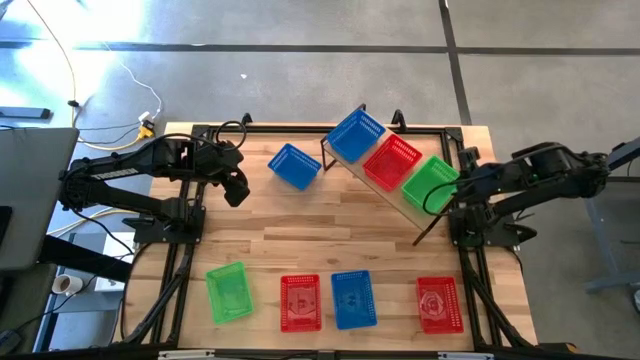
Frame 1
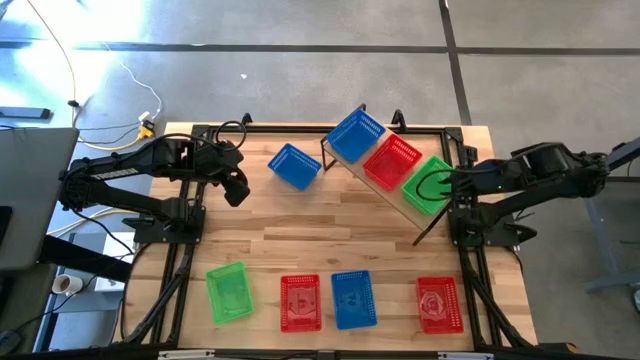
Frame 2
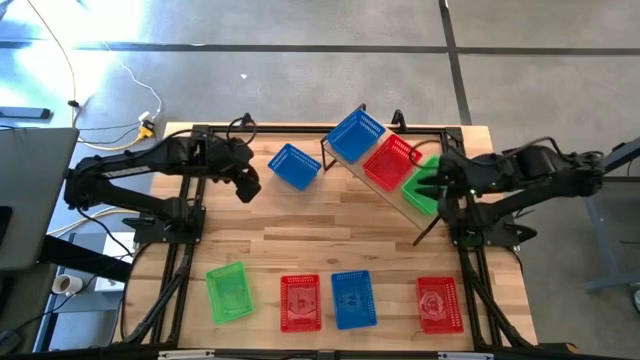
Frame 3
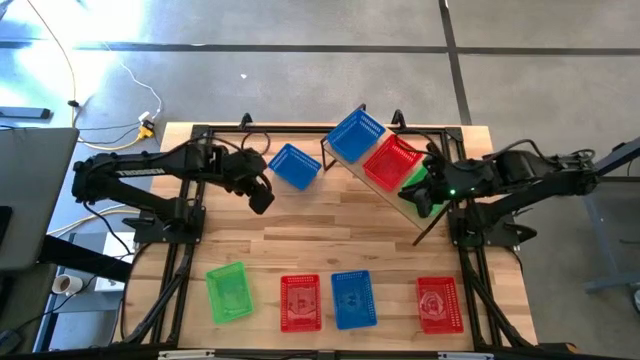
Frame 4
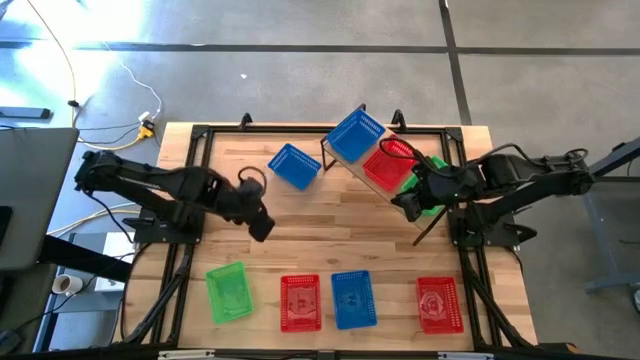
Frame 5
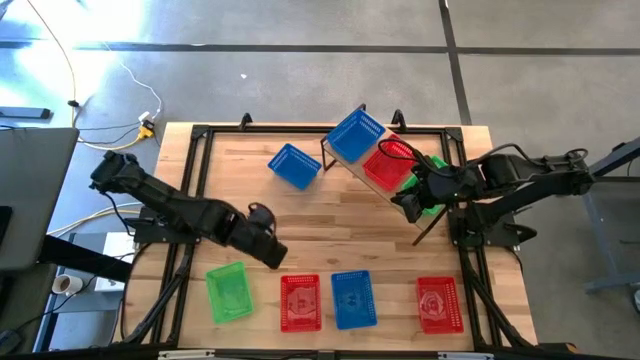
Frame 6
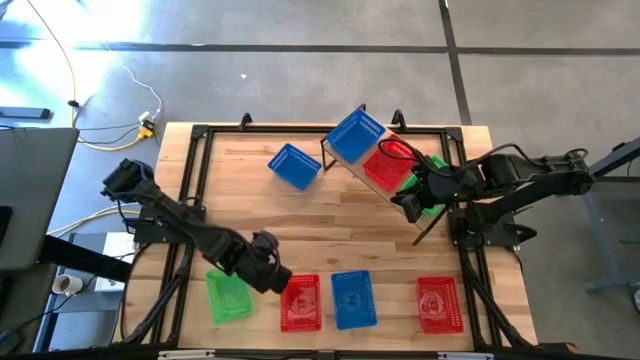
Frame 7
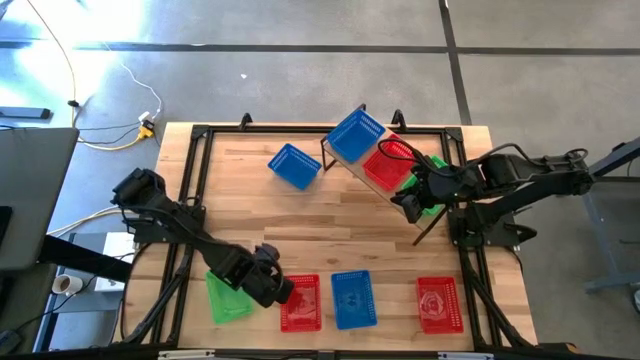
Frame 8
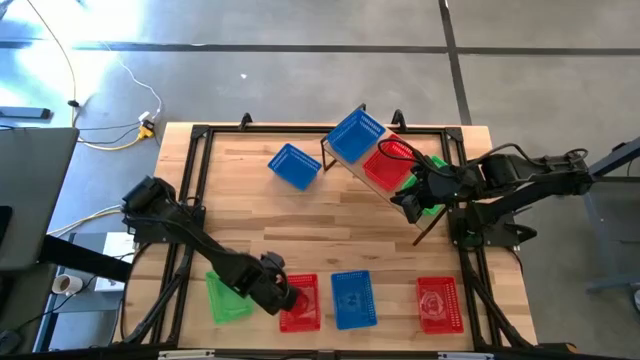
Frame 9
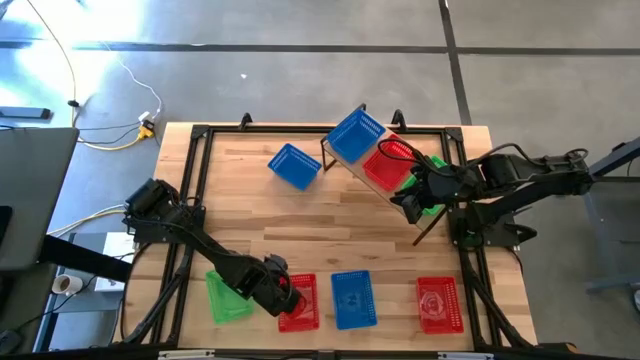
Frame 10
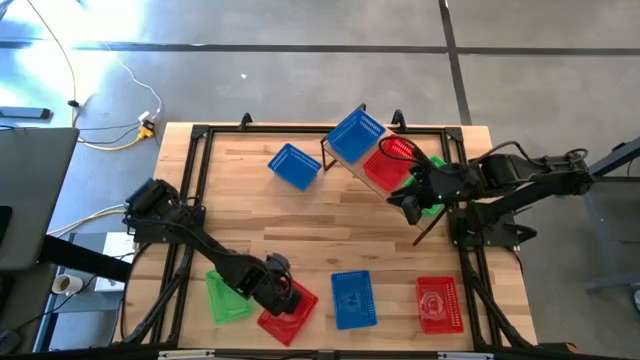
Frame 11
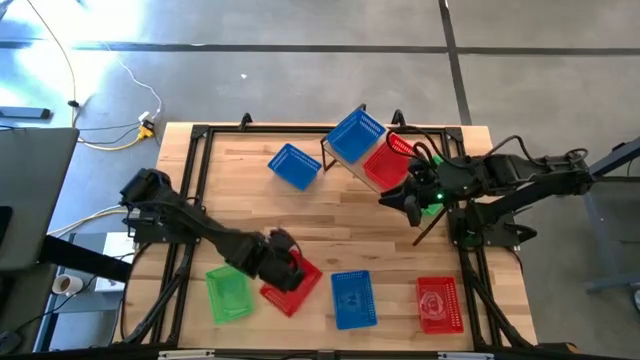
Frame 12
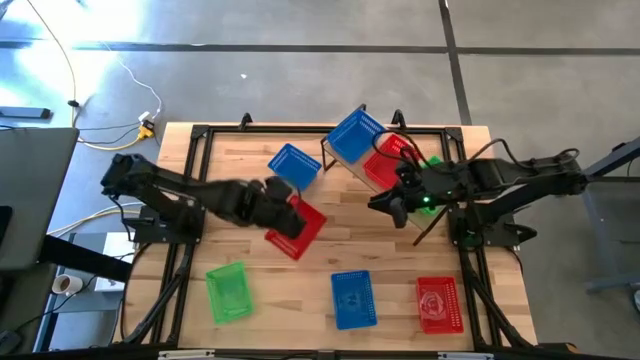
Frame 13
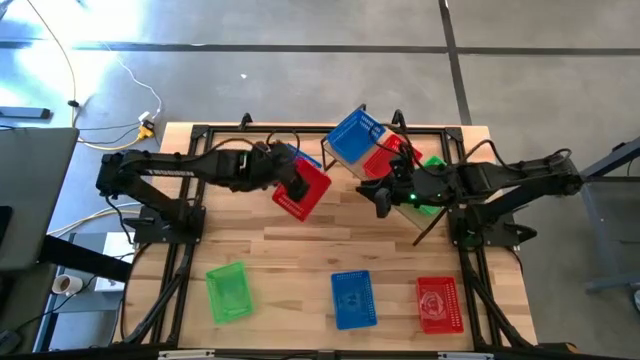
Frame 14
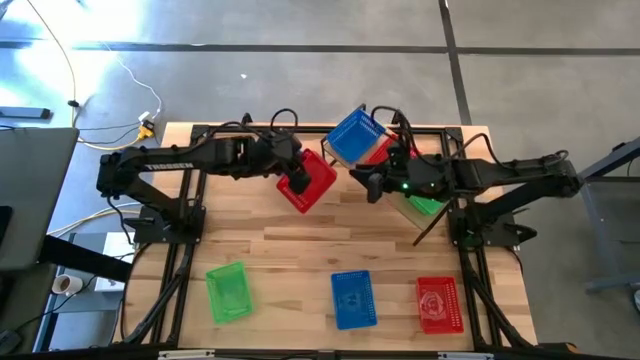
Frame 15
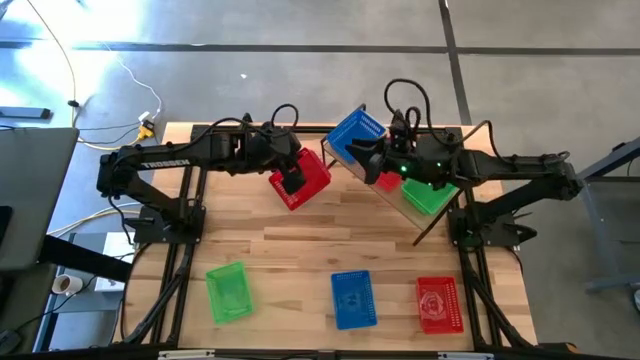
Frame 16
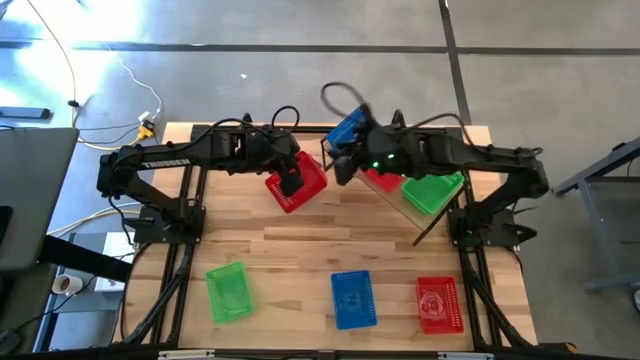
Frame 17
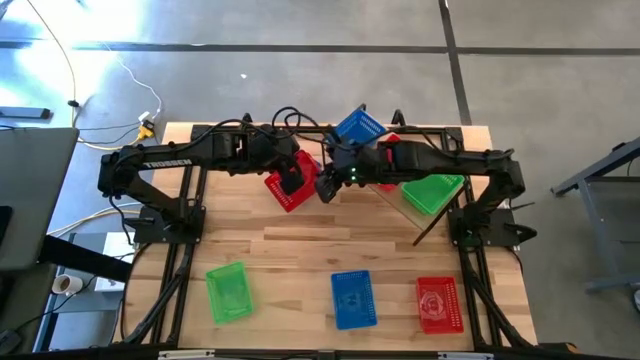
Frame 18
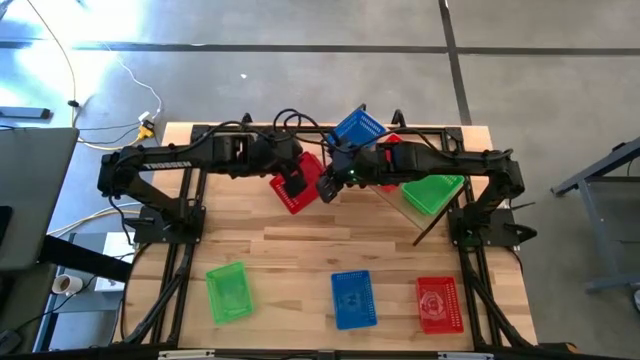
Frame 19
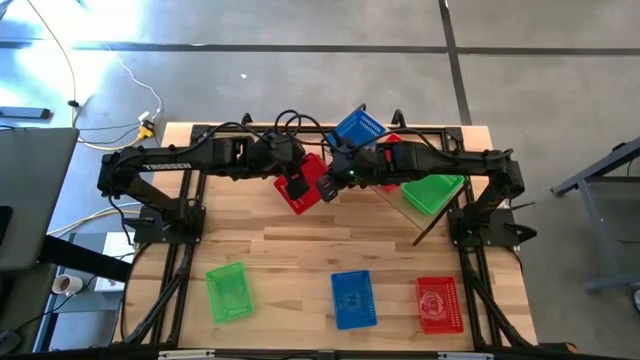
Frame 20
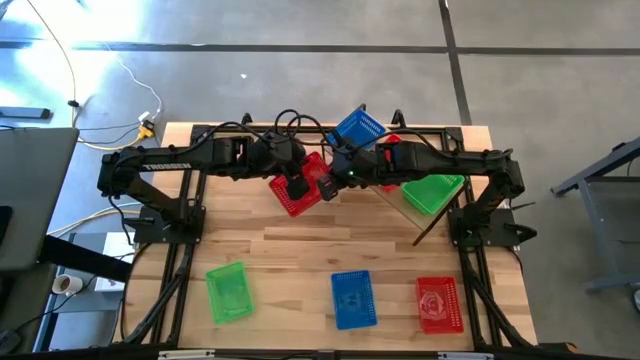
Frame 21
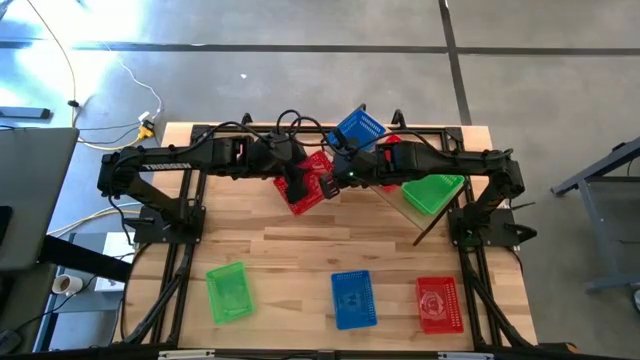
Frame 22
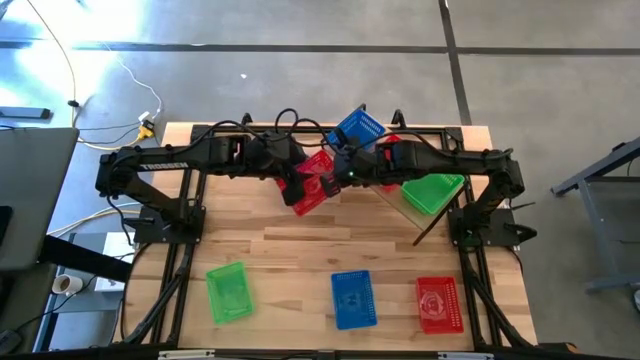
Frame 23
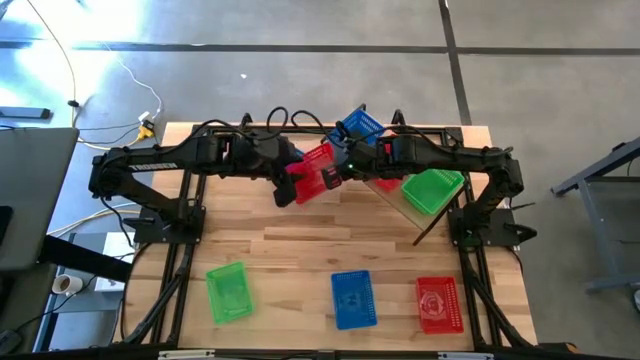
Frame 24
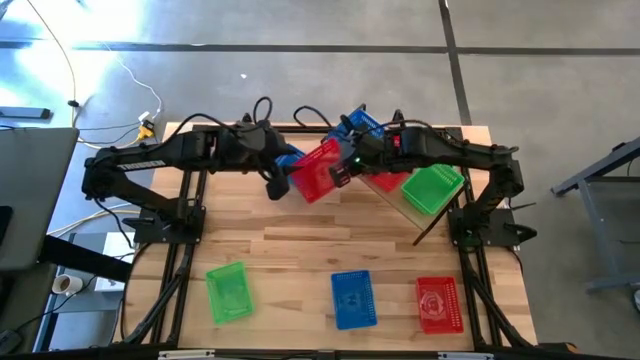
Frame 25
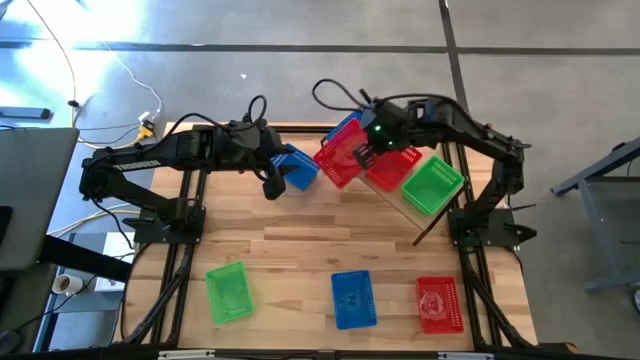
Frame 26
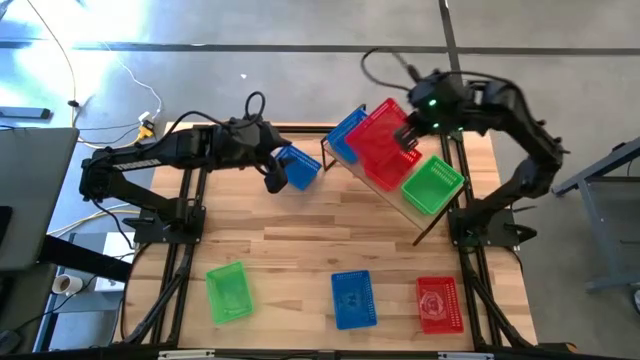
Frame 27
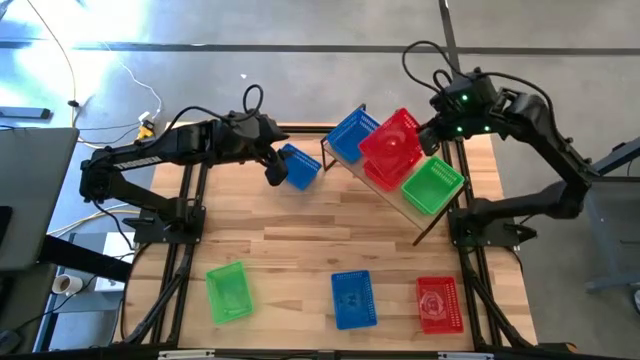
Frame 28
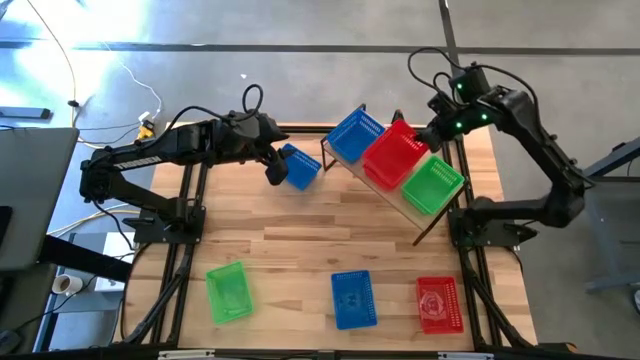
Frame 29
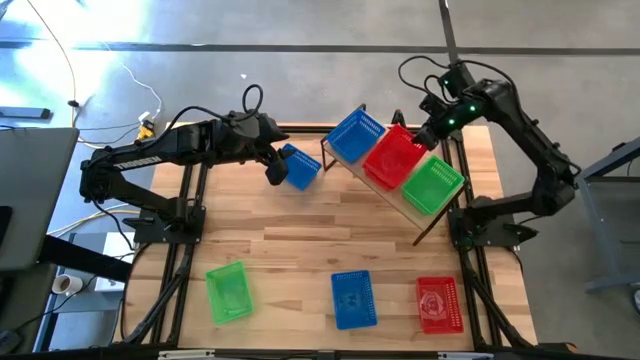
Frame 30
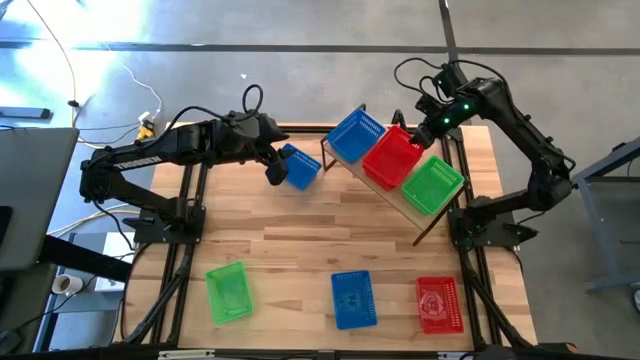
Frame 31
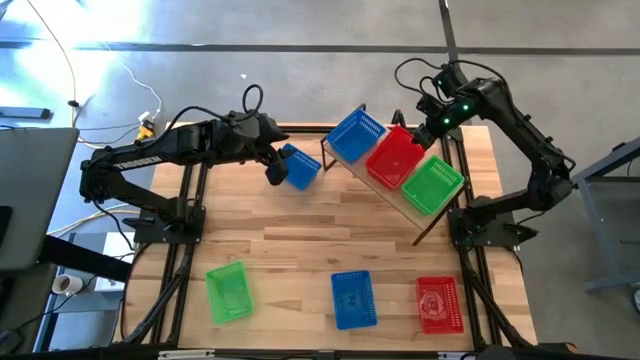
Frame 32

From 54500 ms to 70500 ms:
Task: Stack baskets on shelf by color
Stack the left red basket on the red basket on the shelf

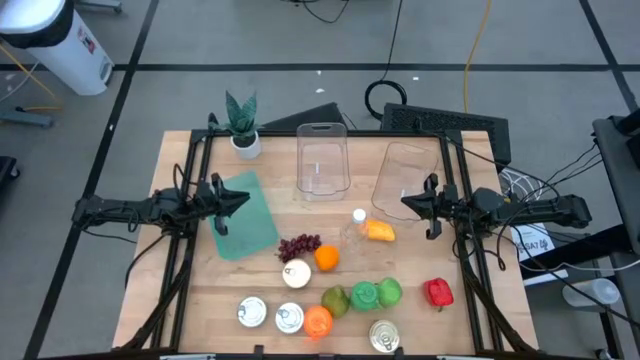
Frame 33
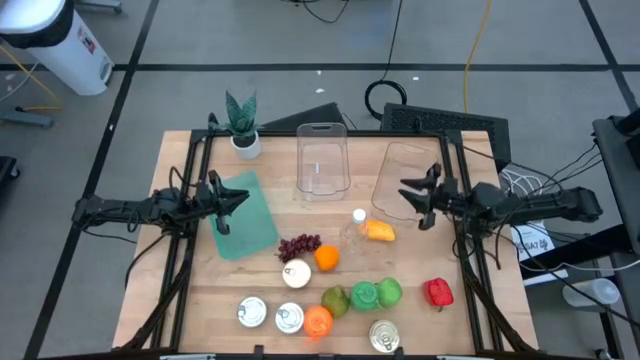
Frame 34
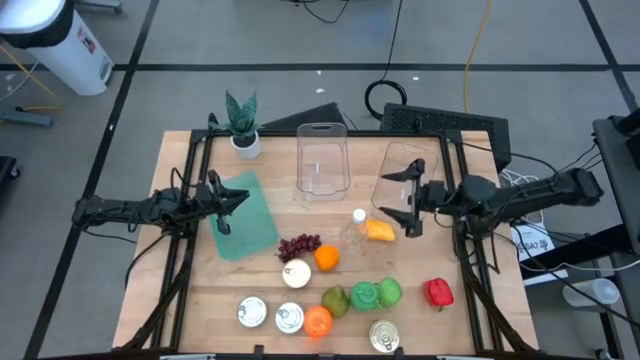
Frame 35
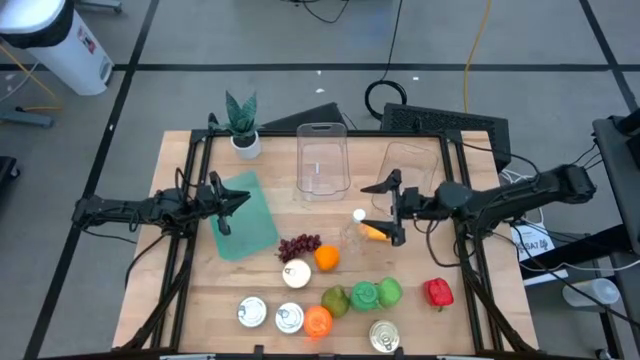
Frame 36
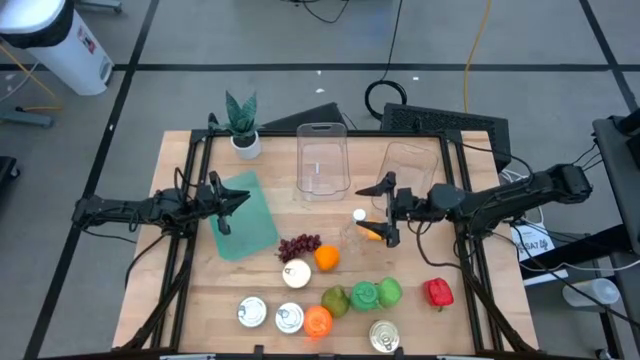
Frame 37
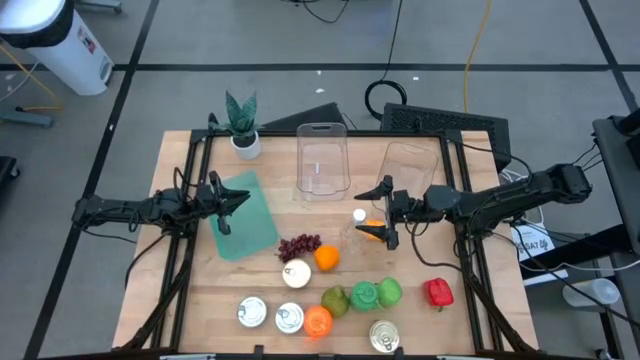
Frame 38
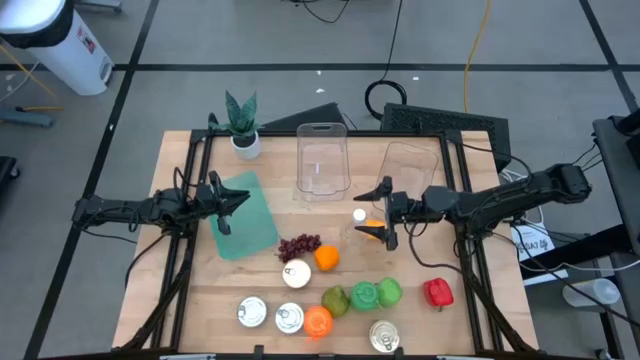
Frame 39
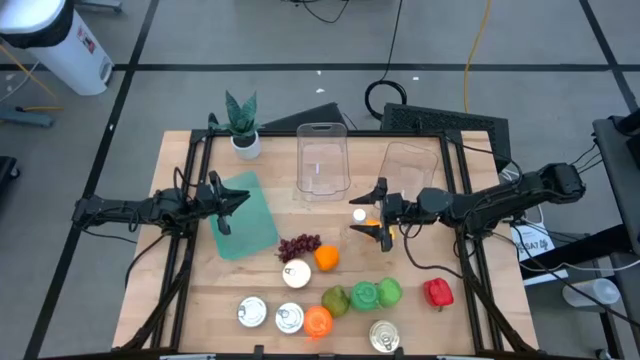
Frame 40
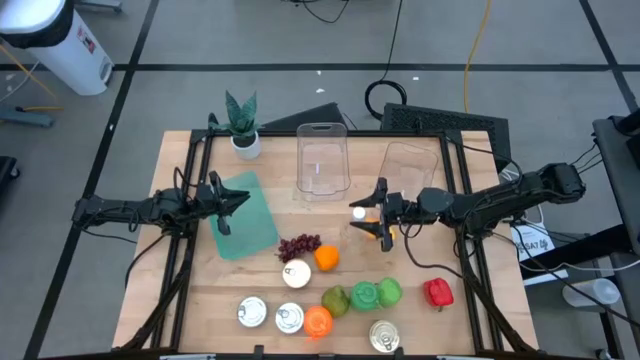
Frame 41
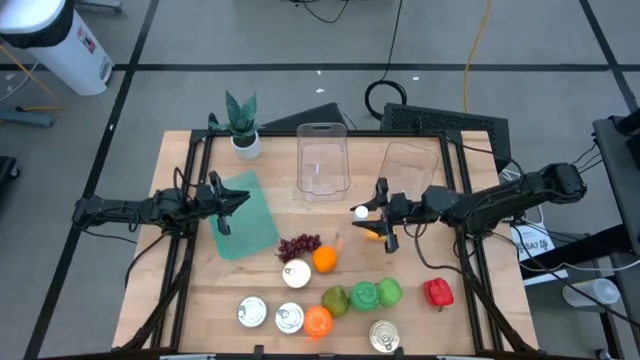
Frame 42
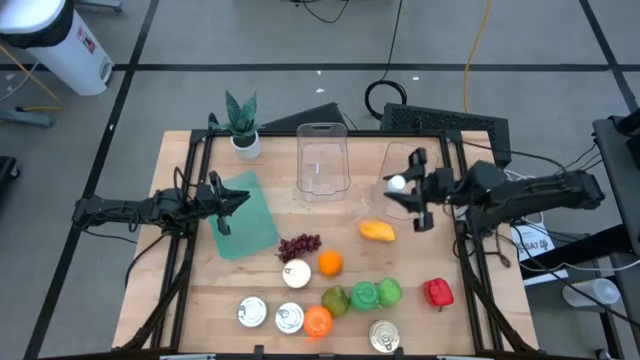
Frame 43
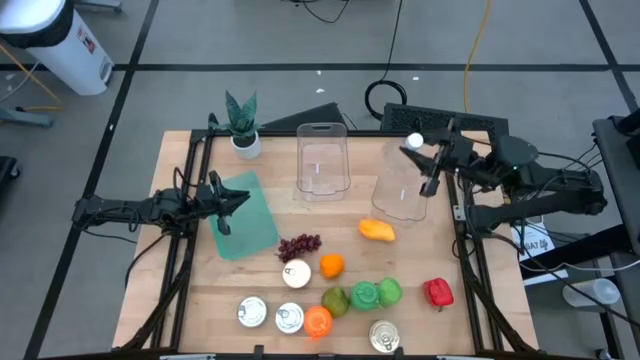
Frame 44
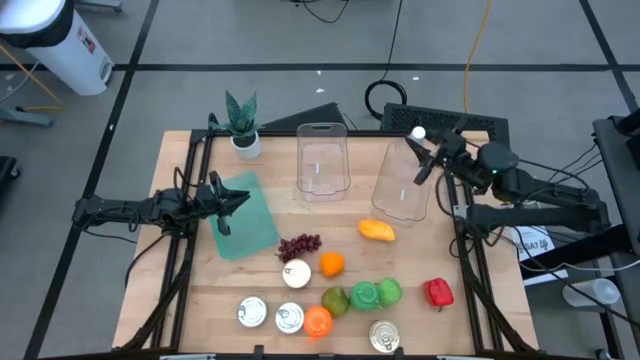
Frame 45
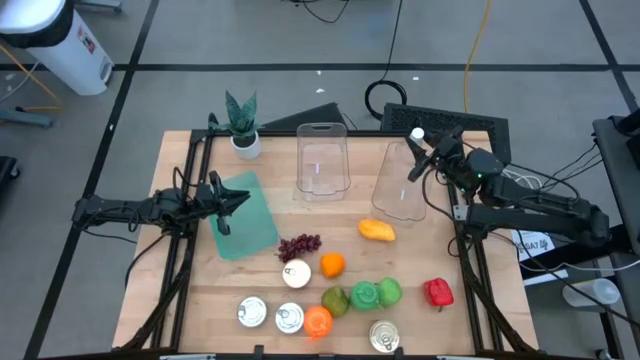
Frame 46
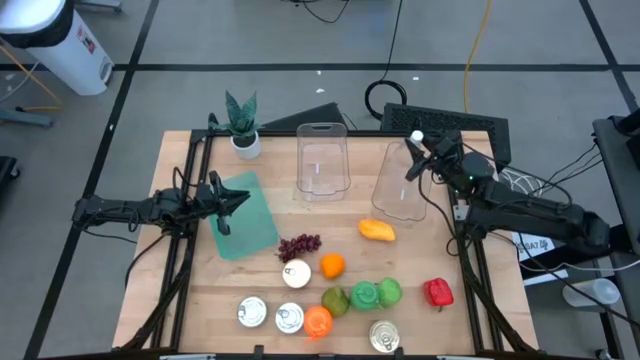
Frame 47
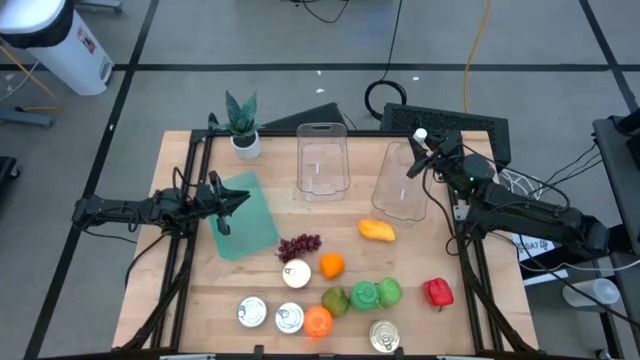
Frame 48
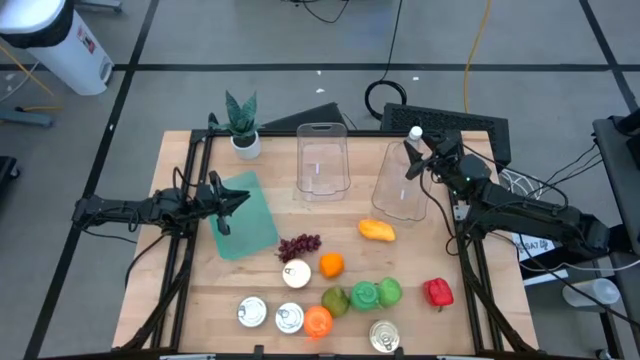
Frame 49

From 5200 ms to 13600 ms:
Task: Pick & Place Food Item
Put the transparent bottle into the right transparent bin
